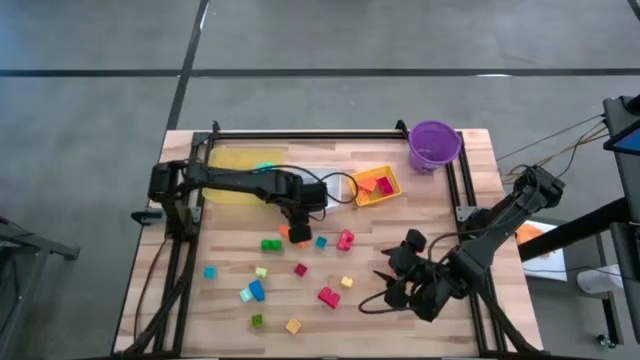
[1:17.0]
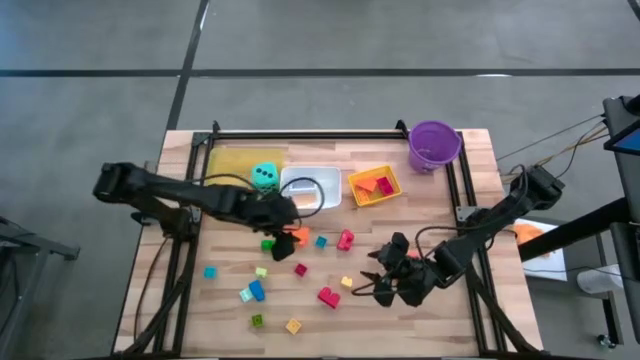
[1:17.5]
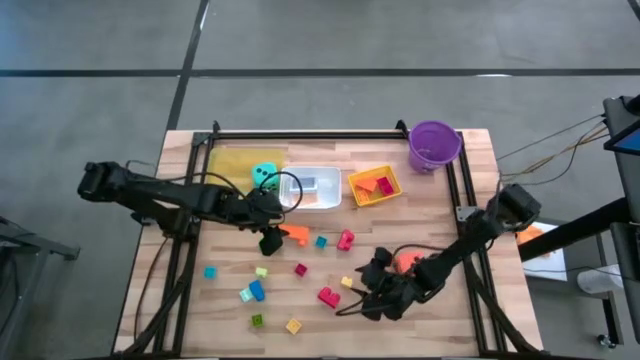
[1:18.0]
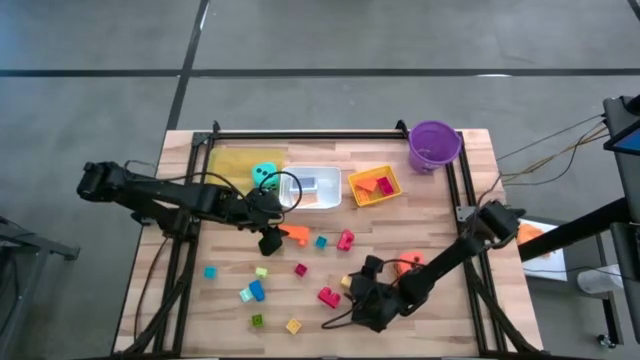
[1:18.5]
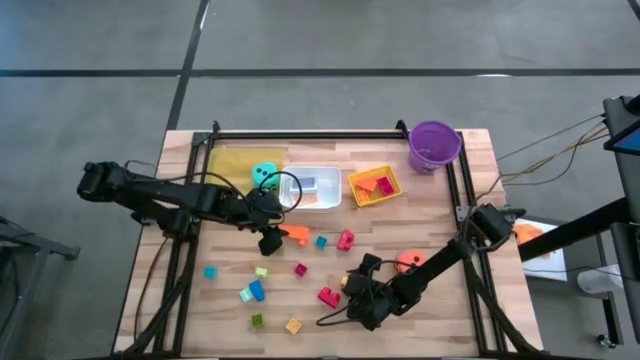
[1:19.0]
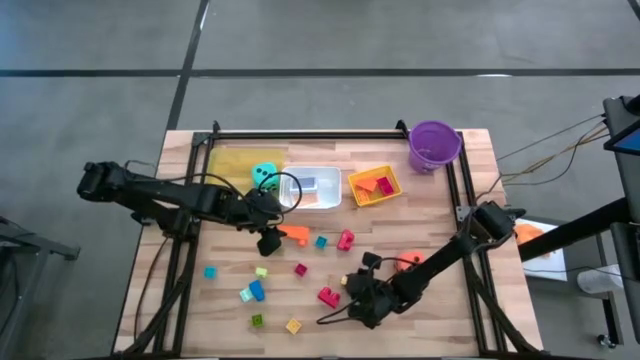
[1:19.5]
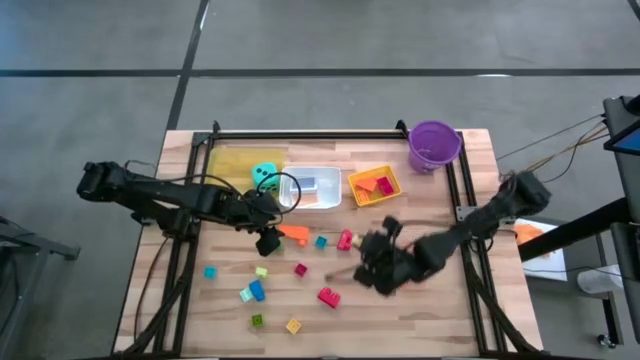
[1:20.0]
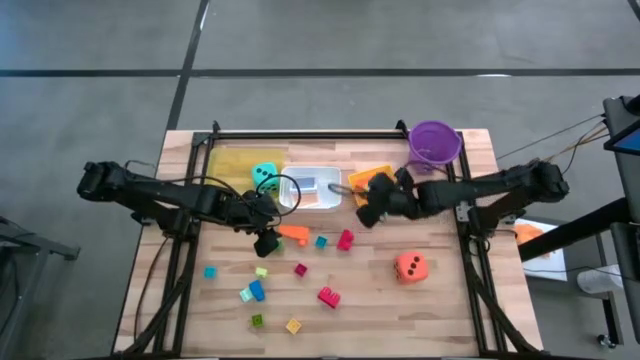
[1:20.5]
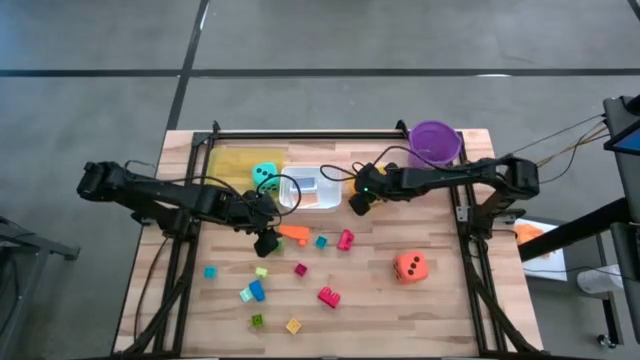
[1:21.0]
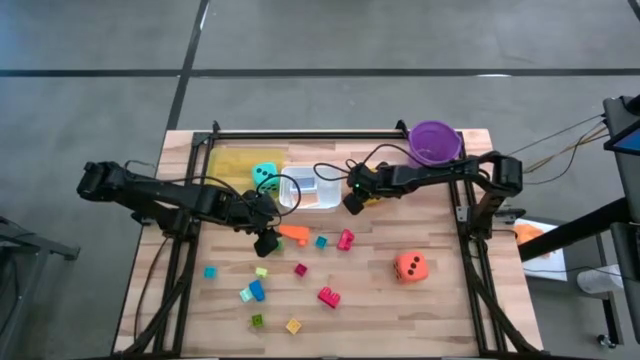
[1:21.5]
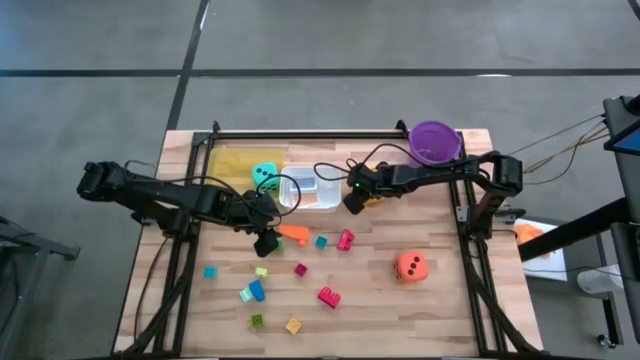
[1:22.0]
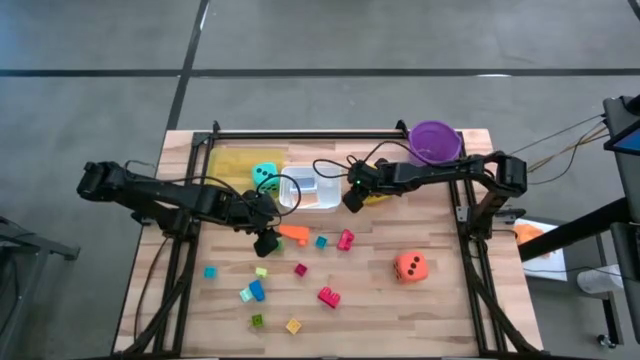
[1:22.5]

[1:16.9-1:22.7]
Task: Pick & Place Toys
Put the light yellow game piece into the yellow bin

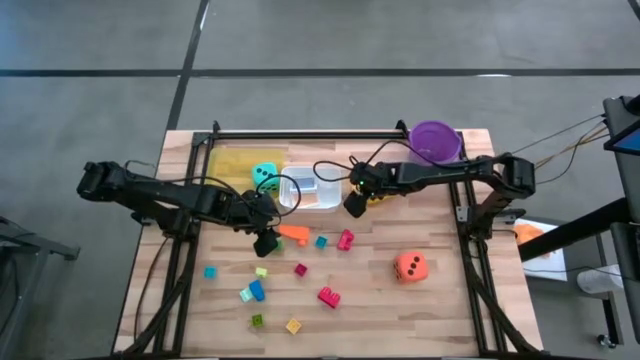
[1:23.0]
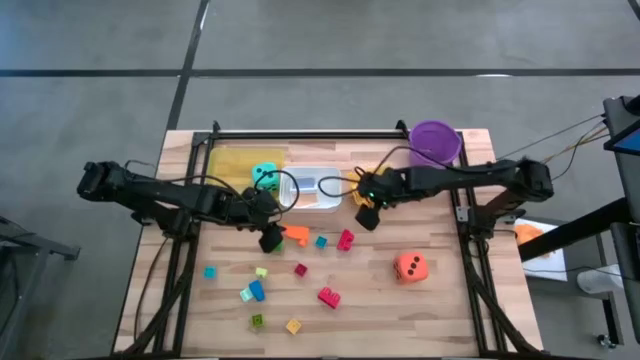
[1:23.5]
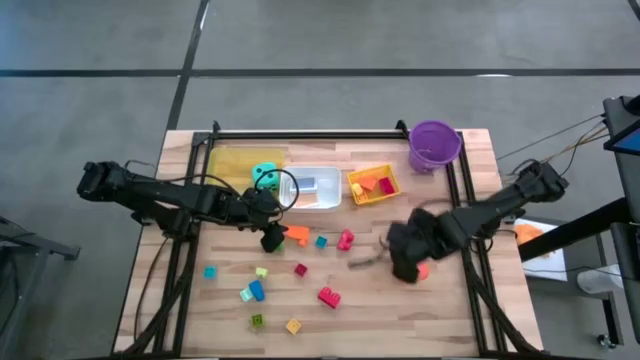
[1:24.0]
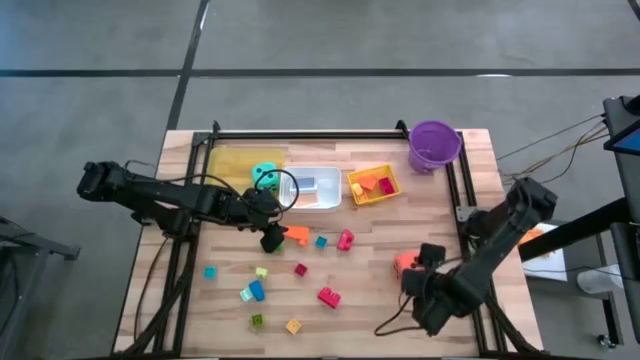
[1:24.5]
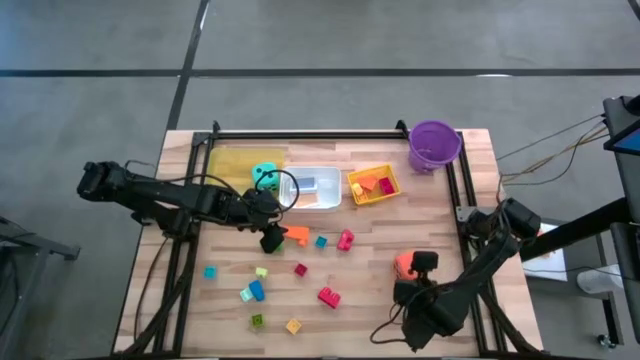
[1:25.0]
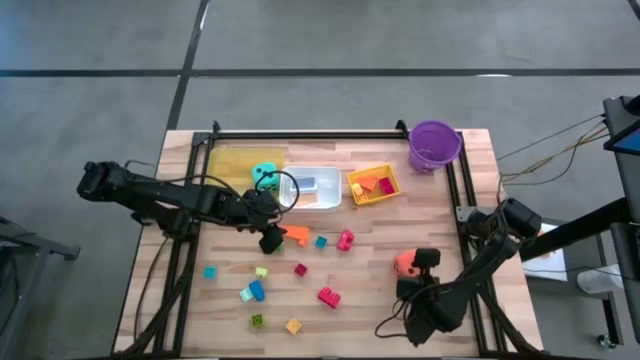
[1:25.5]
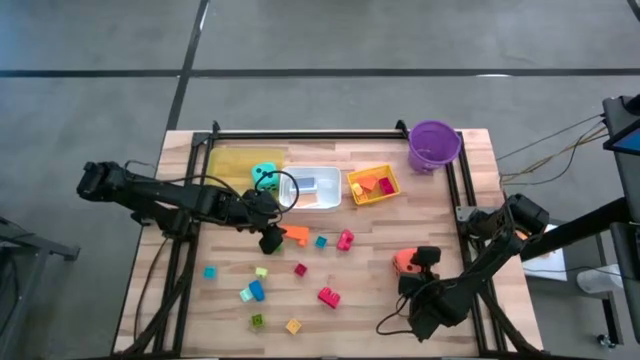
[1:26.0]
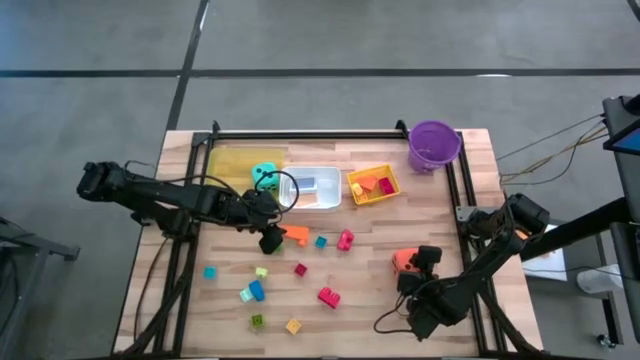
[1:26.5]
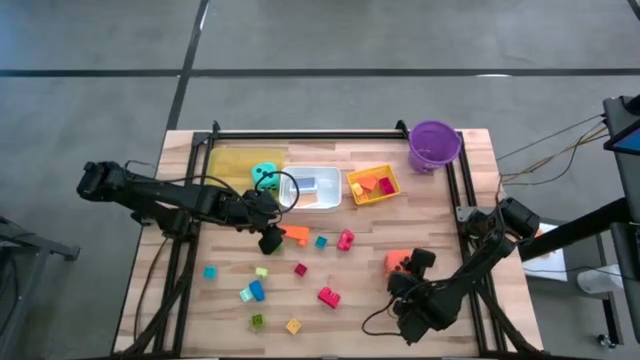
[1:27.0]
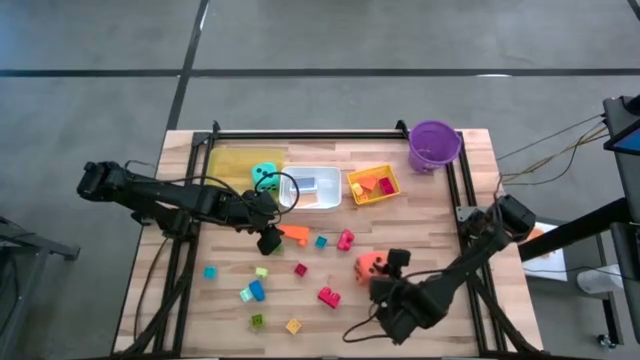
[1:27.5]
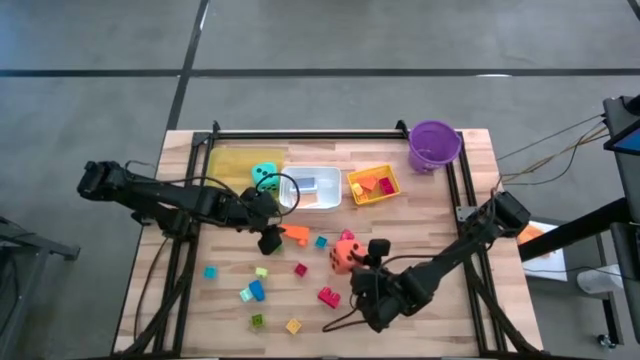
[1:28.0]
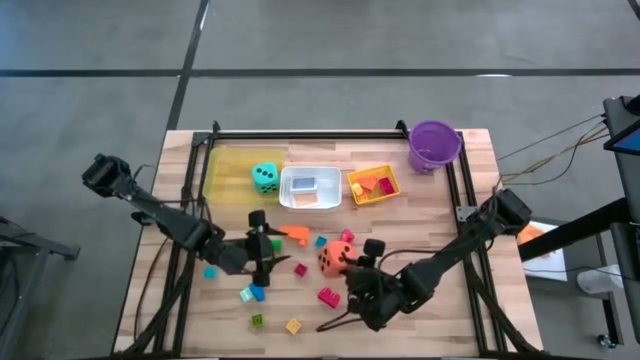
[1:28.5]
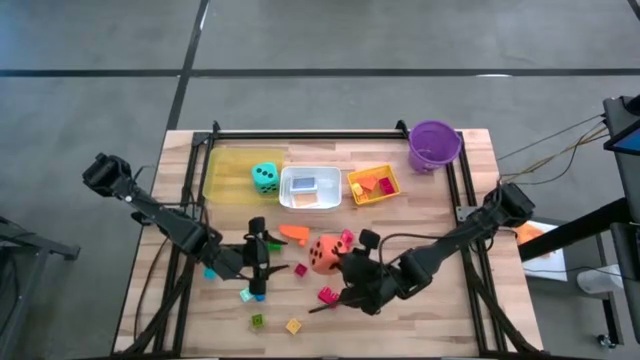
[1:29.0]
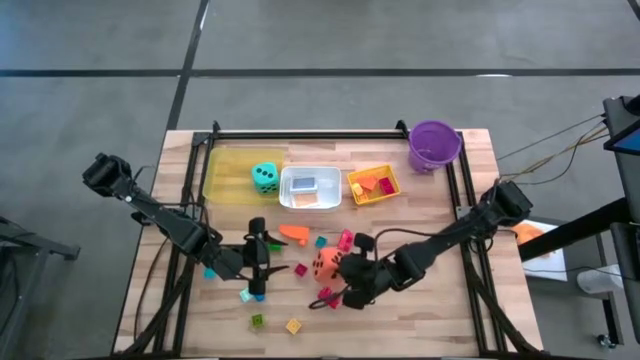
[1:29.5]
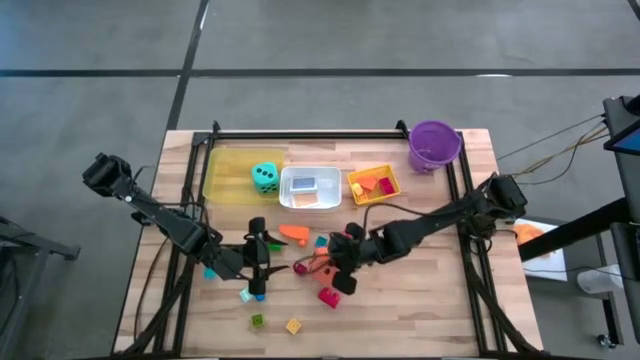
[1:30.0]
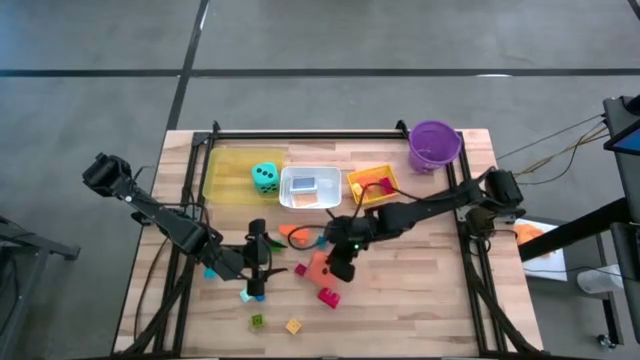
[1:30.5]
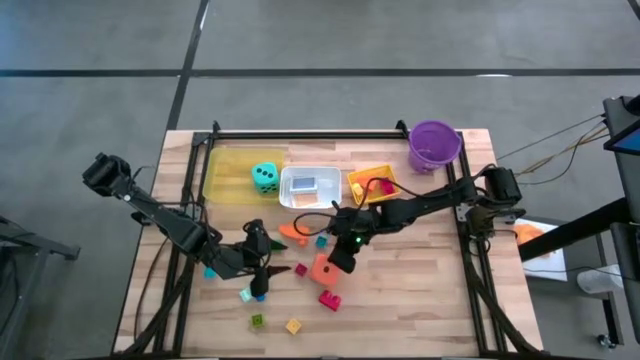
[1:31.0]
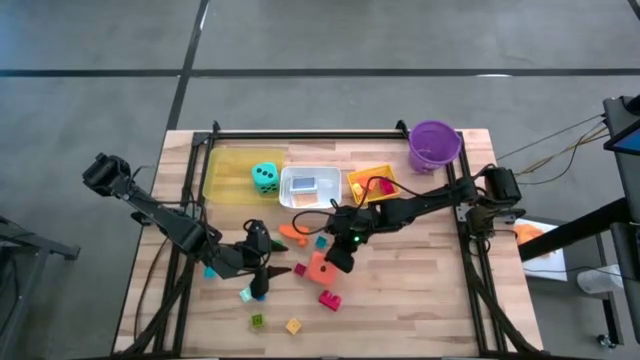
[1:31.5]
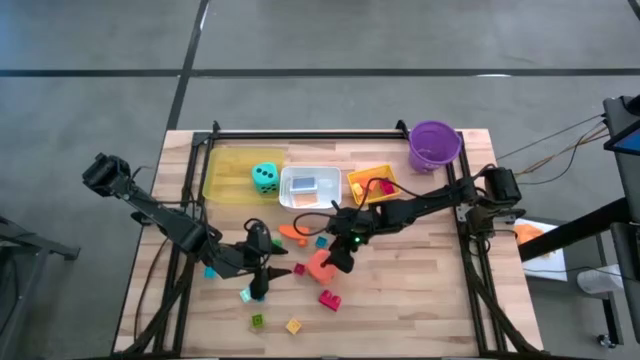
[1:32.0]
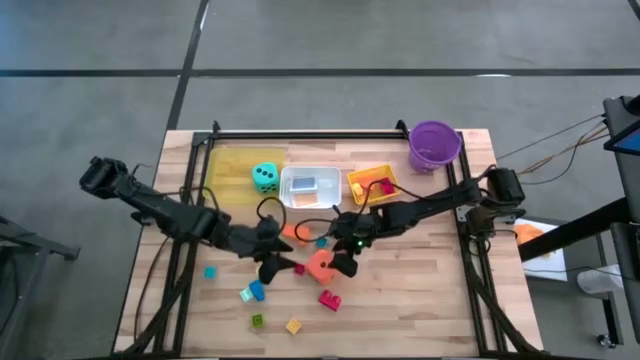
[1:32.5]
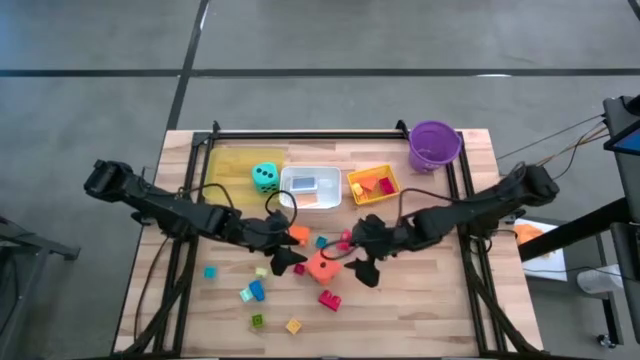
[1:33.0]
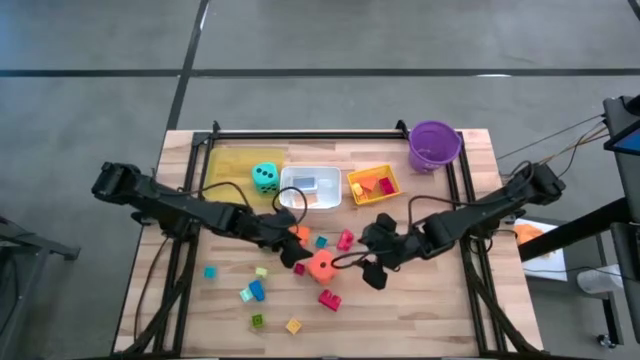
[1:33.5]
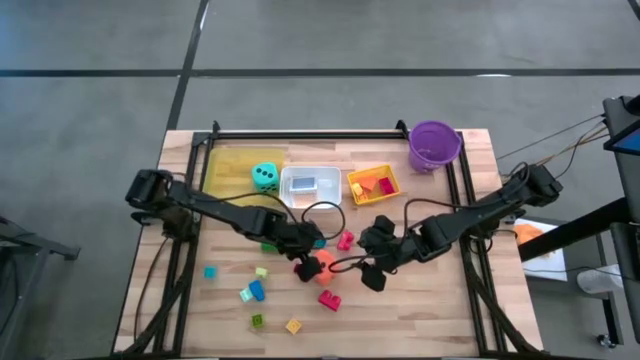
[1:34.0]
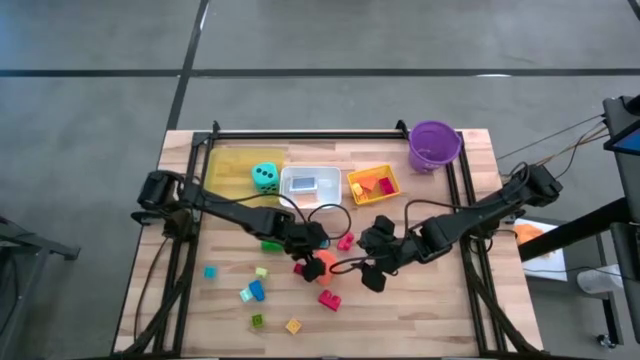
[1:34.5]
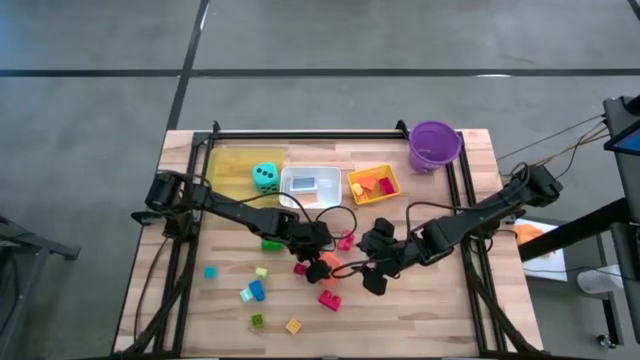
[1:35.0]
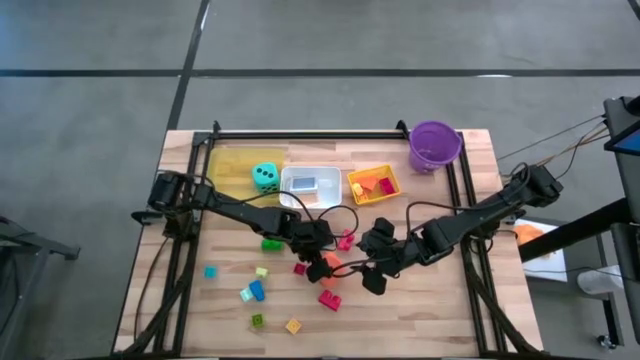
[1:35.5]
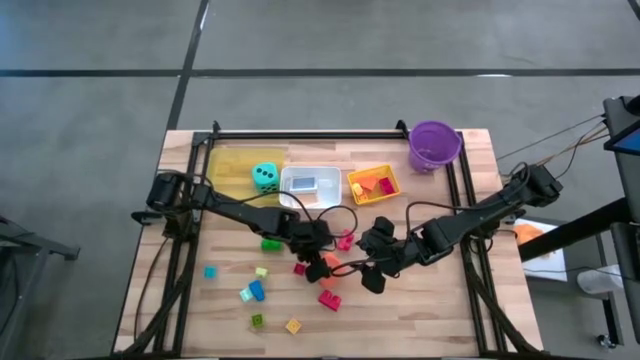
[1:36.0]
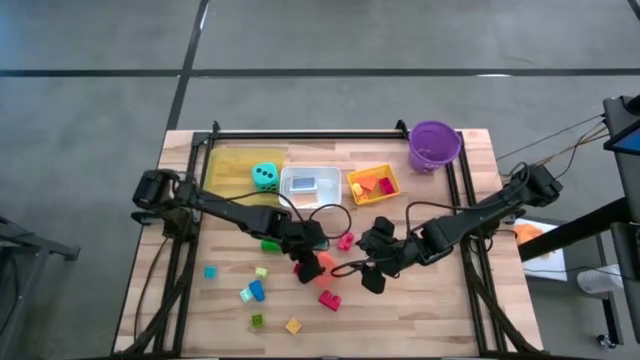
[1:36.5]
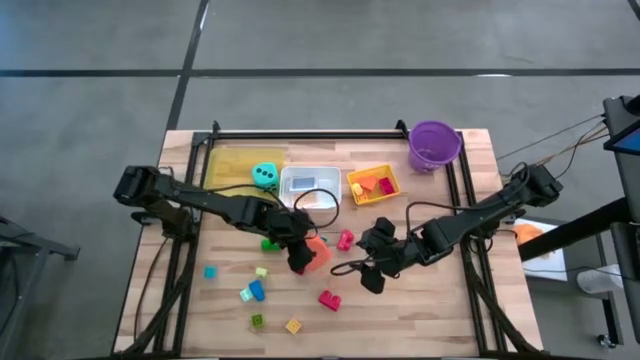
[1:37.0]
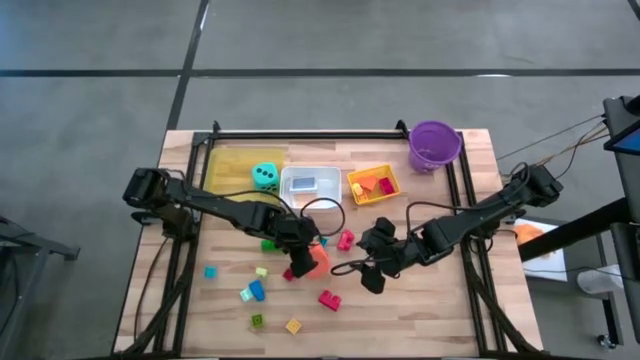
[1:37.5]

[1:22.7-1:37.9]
Put the orange dice into the yellow transparent bin
